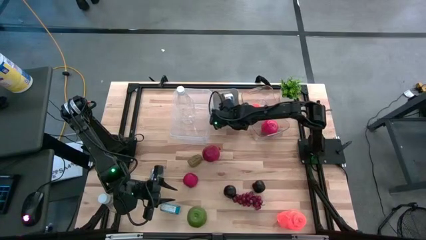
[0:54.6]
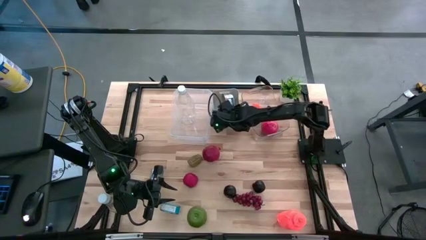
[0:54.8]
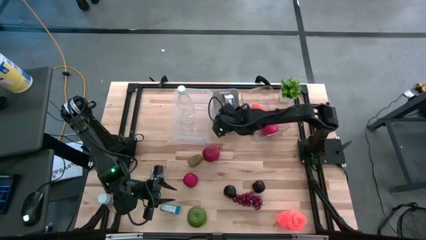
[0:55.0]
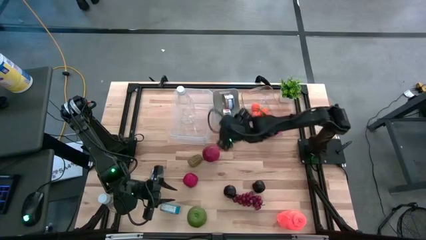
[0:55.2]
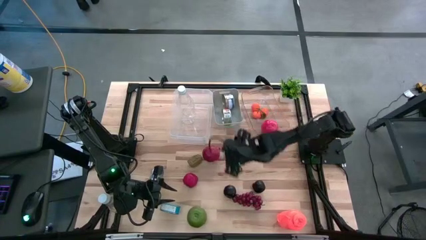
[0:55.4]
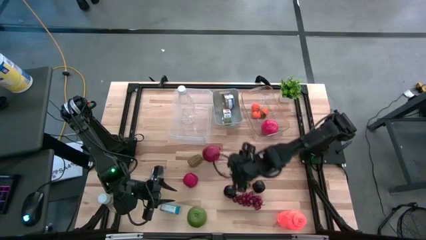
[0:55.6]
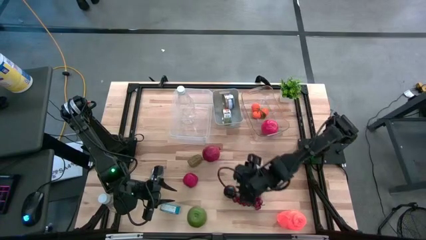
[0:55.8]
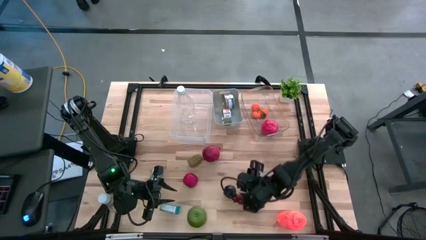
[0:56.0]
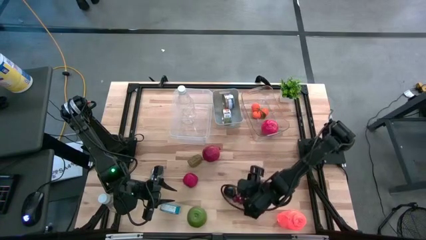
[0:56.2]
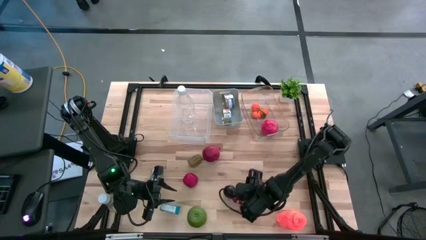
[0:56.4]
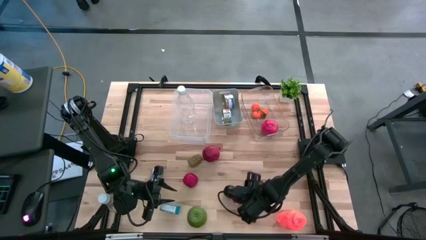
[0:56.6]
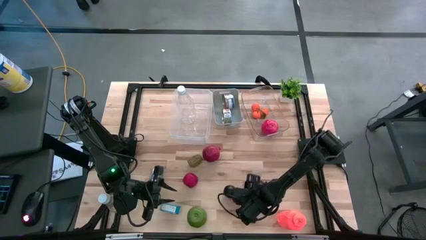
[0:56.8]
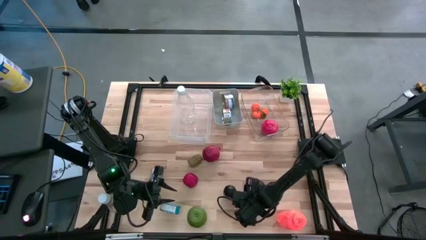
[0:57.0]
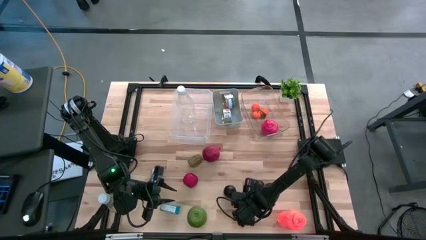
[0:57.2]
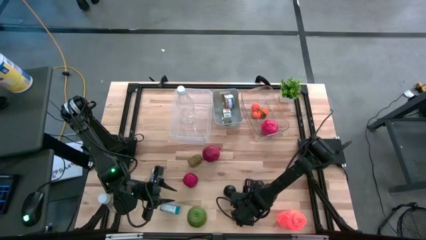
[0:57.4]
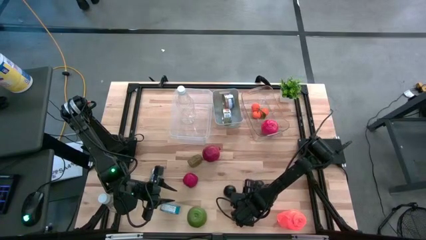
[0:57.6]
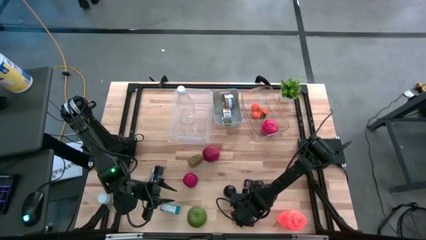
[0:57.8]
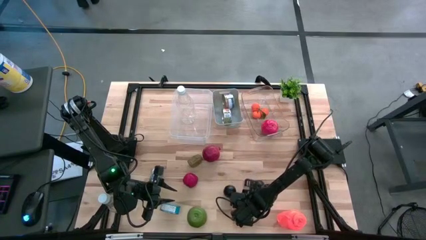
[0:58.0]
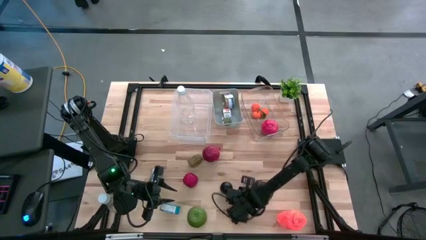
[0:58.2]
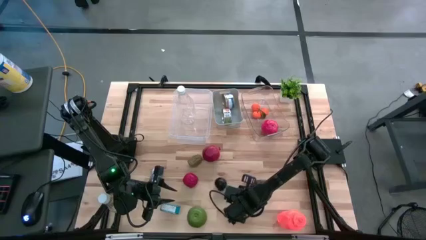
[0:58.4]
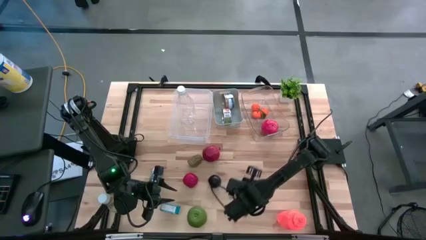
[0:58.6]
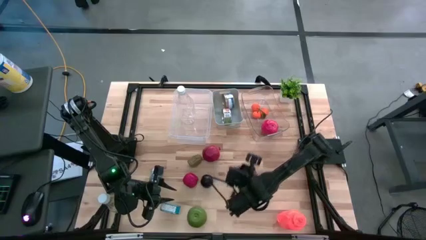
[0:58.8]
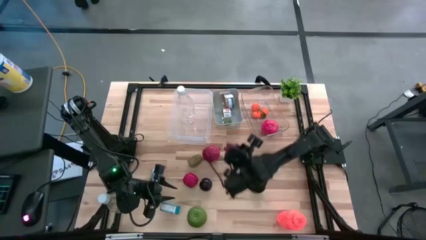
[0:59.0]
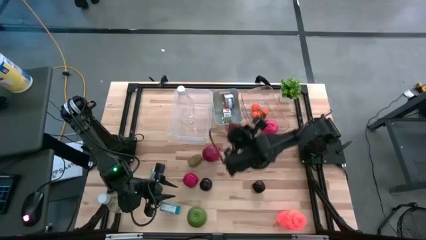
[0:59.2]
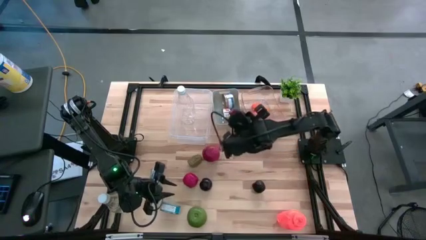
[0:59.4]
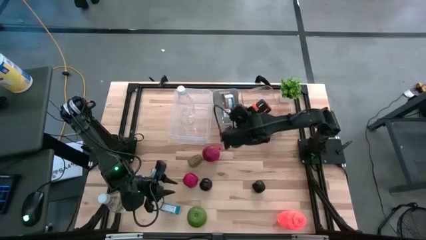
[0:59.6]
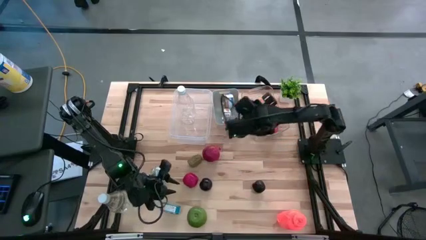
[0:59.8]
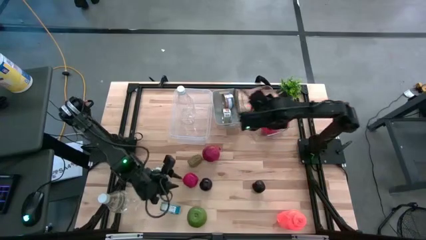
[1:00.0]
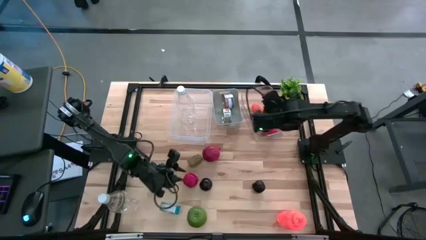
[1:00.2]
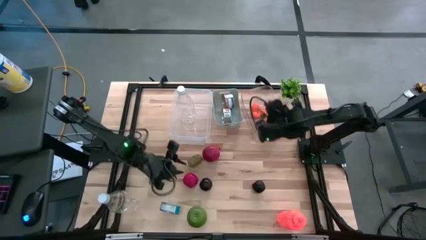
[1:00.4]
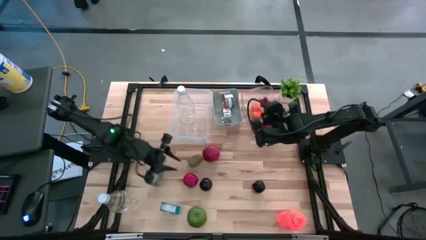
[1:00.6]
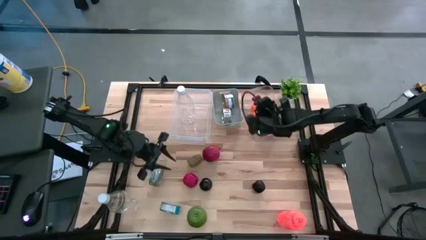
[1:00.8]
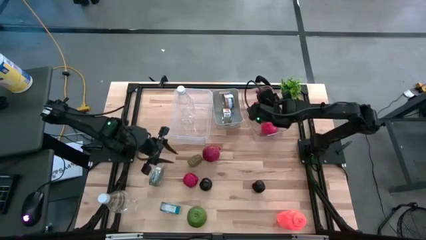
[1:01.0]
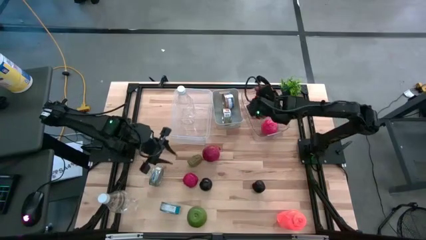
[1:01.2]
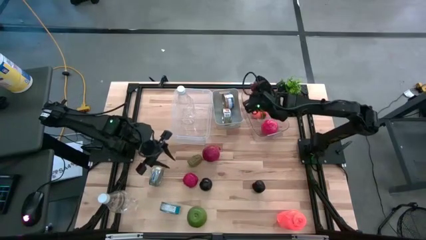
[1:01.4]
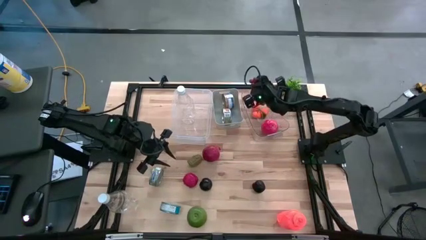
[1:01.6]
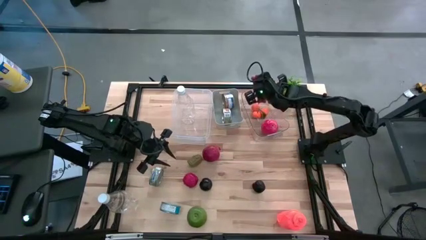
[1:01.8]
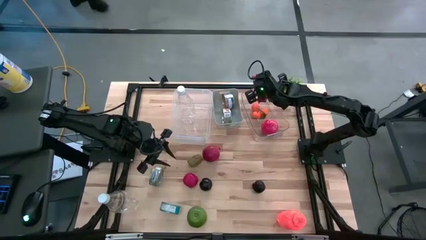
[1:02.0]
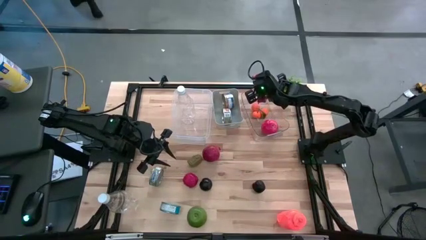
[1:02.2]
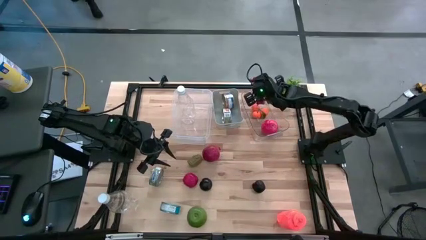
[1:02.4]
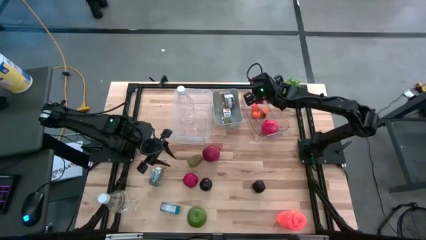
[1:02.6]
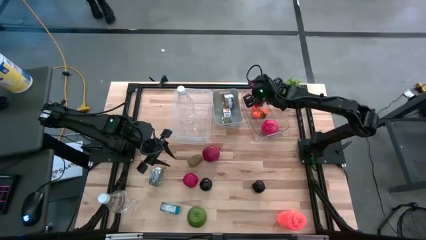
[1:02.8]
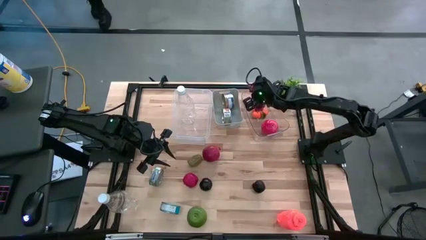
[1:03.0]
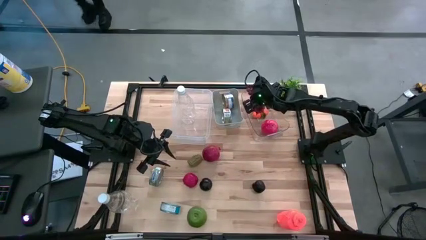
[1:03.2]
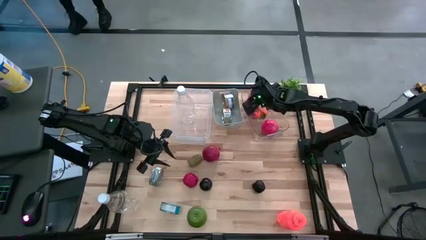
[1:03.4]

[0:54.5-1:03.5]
Task: Pick & Place Food Item
Put the grapes into the right transparent bin

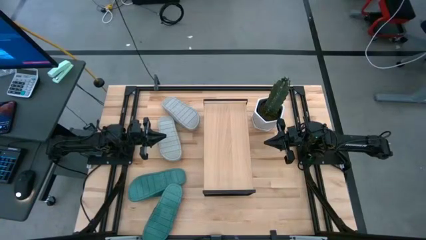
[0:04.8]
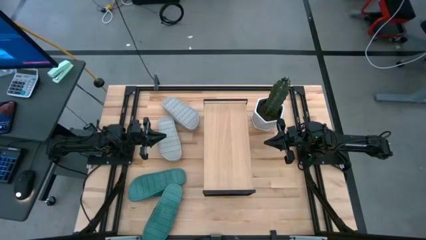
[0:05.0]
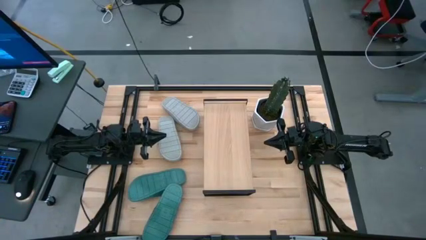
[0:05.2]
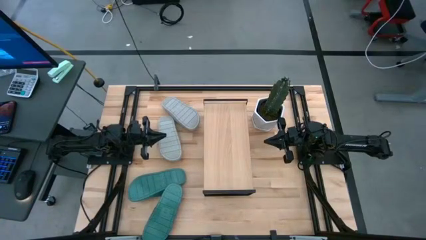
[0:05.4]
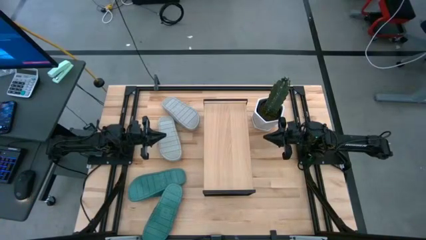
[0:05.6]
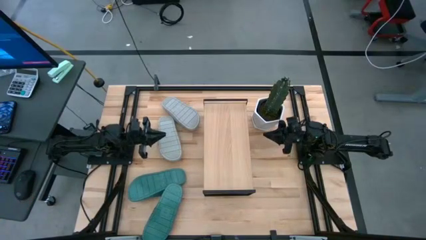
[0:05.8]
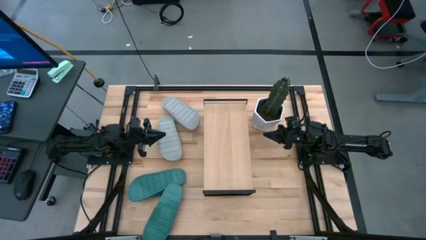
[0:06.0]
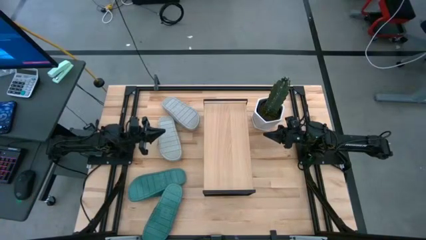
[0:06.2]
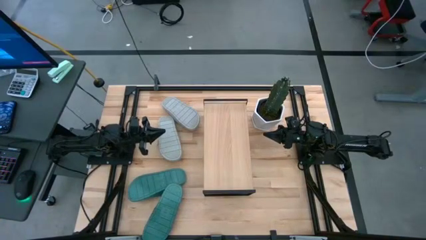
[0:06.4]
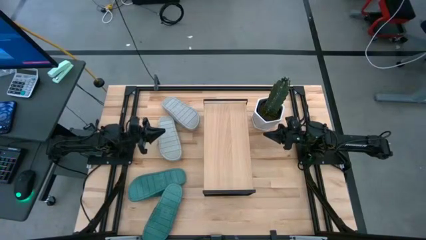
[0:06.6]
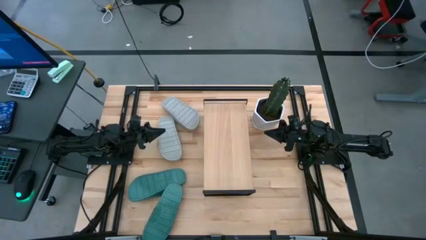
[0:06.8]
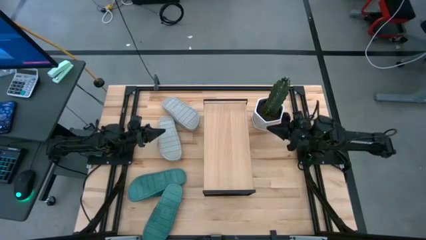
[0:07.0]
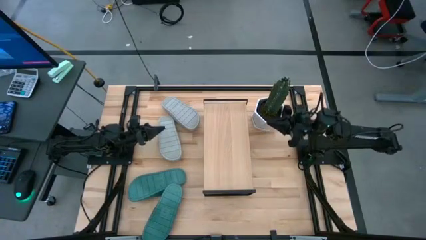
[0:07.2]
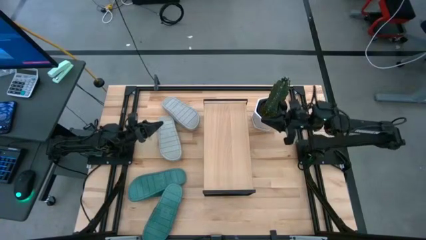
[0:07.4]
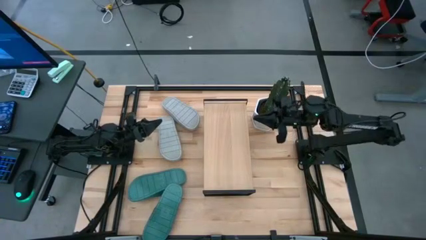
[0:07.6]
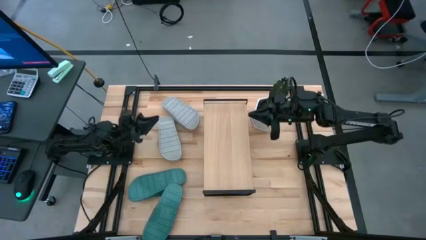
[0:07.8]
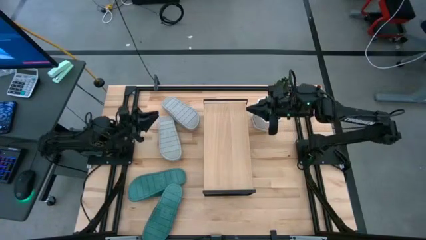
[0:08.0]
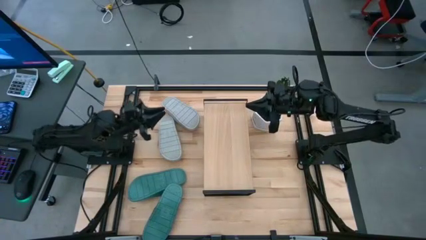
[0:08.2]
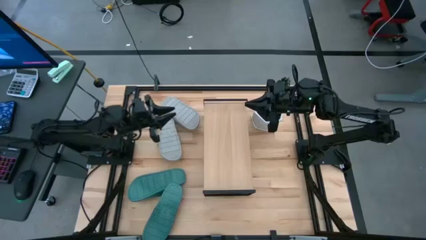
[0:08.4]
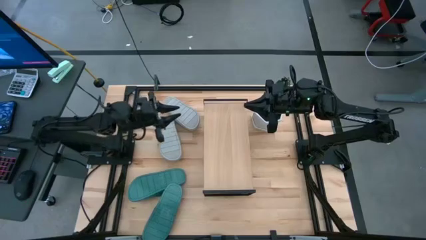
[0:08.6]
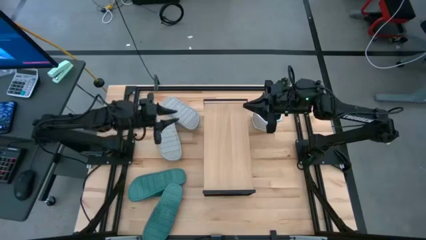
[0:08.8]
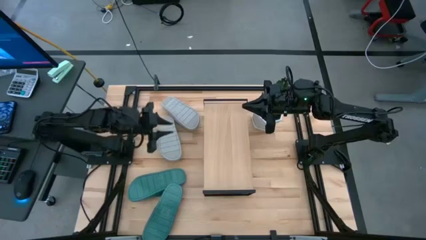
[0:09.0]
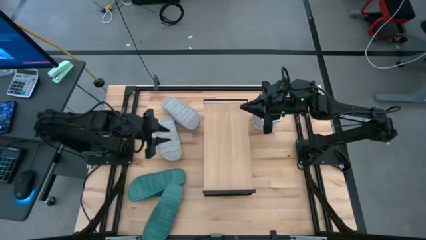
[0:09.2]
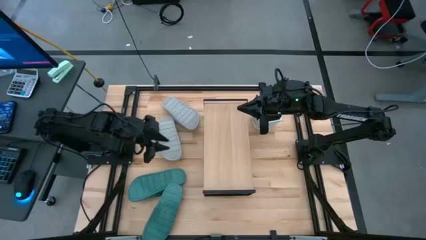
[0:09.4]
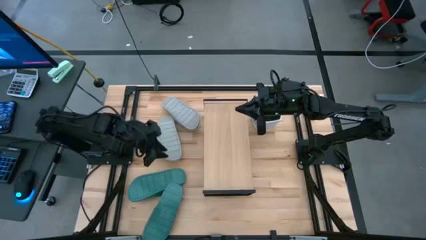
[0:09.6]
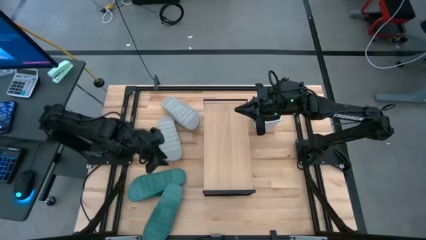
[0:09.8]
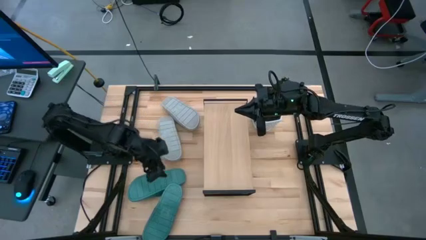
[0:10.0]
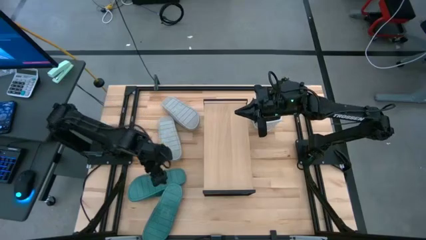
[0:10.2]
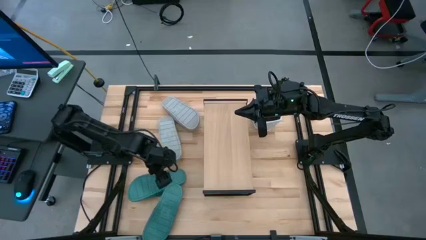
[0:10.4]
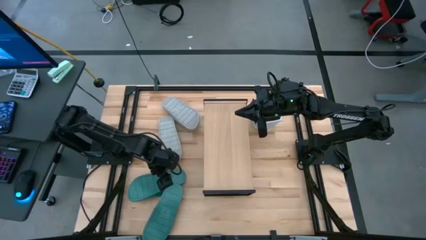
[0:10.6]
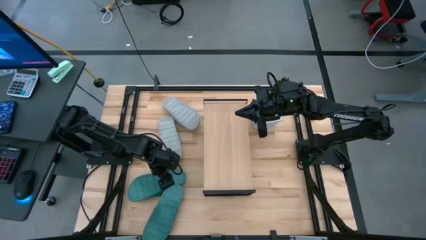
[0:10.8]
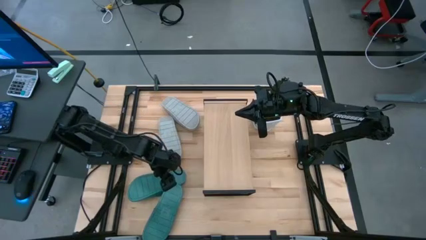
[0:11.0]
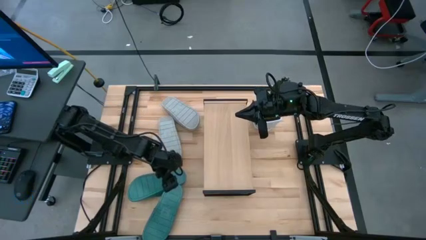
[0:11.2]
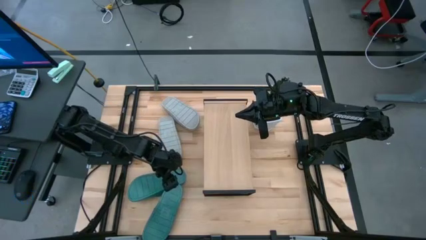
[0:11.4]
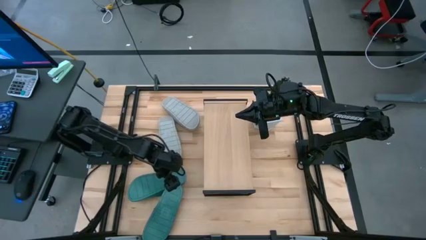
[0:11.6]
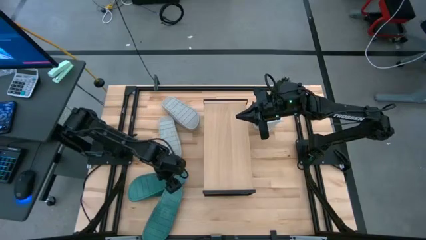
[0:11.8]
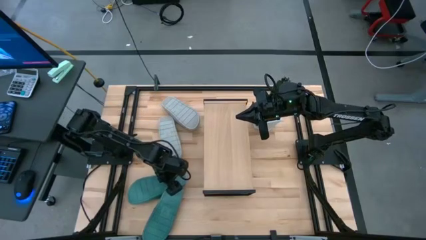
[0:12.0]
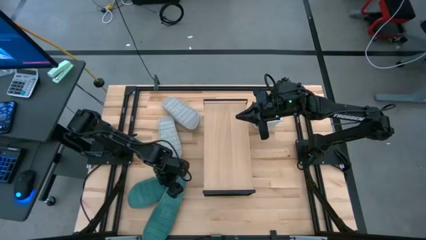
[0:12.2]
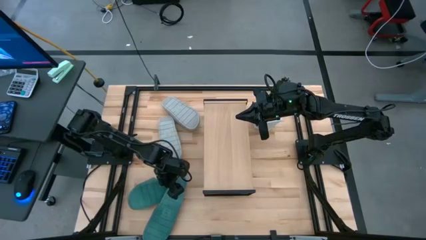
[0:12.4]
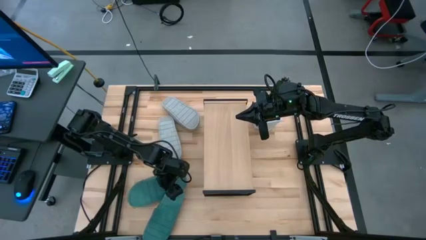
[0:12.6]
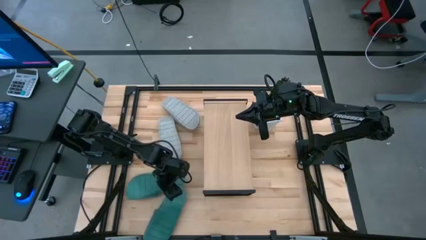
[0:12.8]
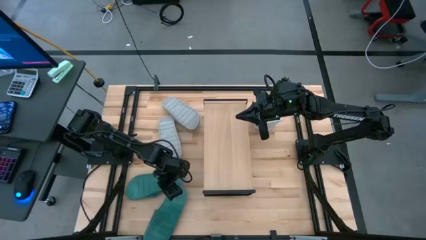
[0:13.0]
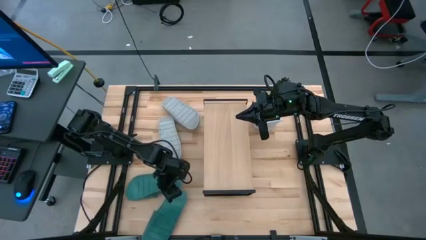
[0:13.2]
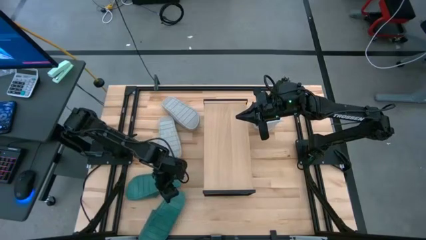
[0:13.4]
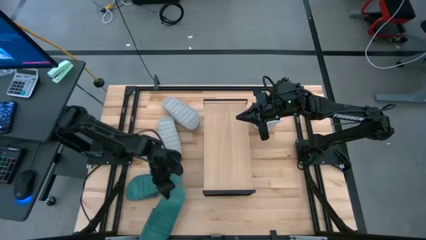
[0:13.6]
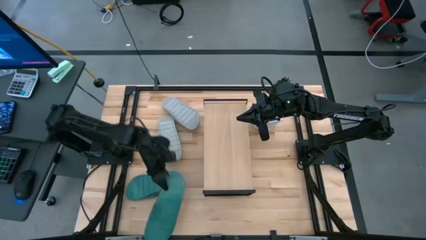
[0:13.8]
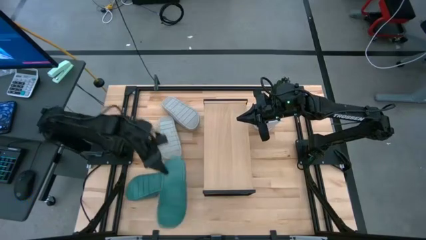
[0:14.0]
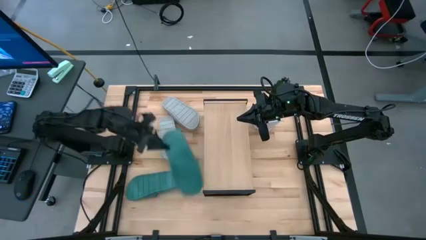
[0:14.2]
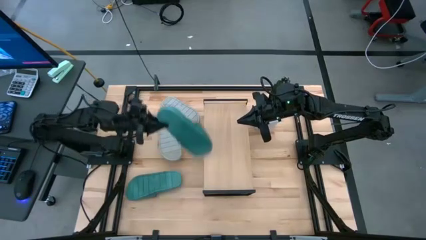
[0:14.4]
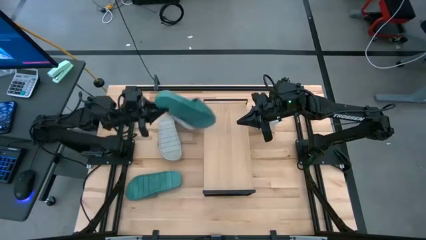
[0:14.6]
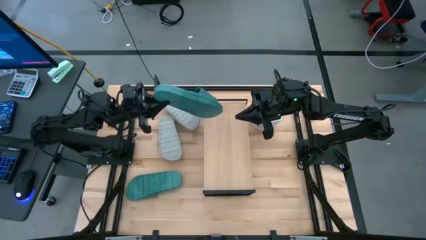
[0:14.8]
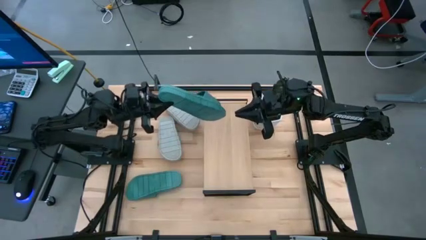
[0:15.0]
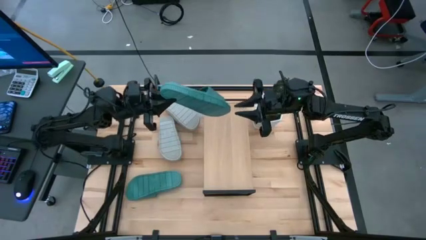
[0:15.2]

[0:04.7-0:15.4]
Task: Pick and place slides into the shelf
Put the bottom green slide on the shelf
